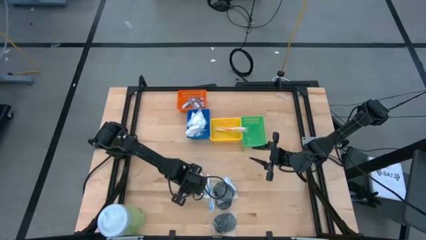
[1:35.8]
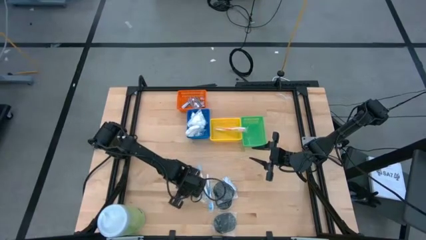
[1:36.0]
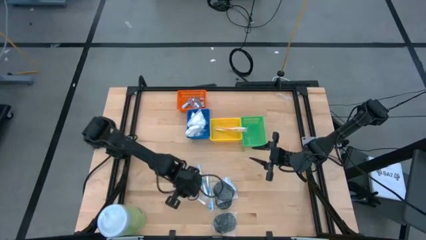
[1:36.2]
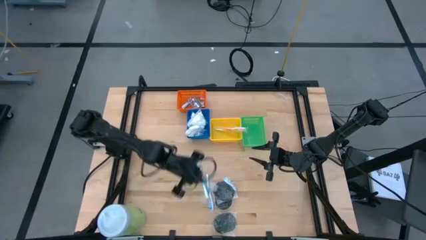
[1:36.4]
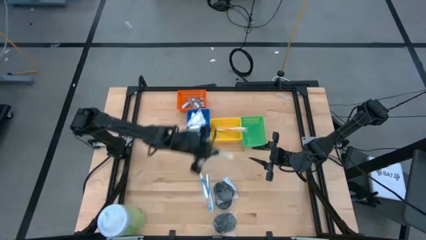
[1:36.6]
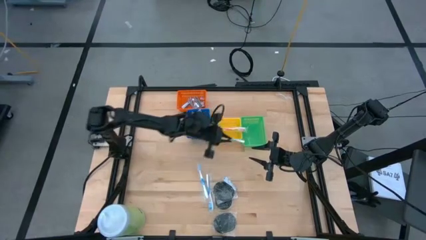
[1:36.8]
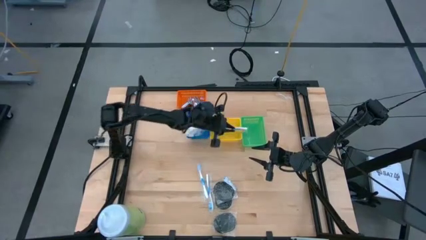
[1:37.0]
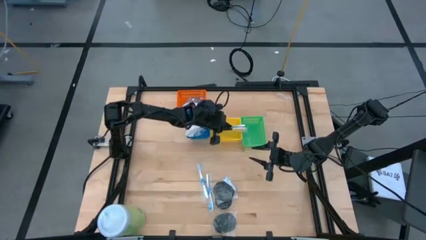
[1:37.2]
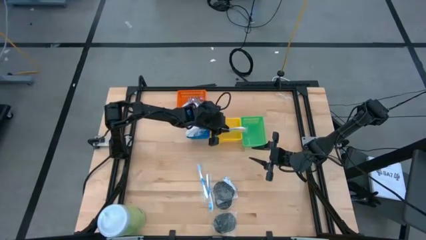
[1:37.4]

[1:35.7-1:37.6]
Task: Pick & Place Travel size toiletries
Put the green toothbrush into the yellow basket

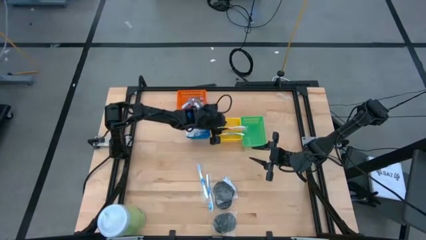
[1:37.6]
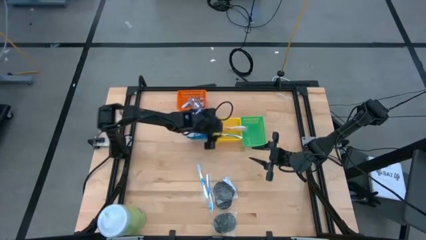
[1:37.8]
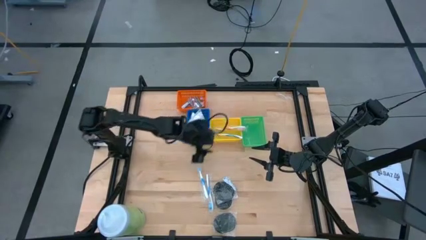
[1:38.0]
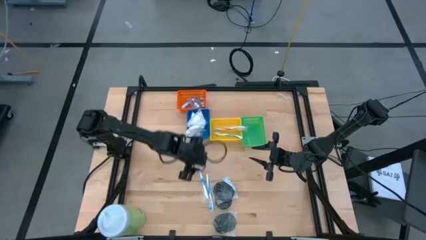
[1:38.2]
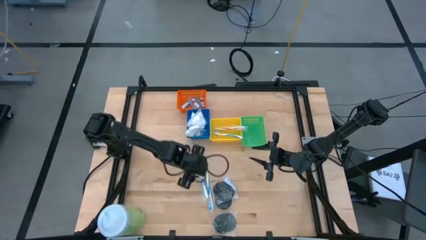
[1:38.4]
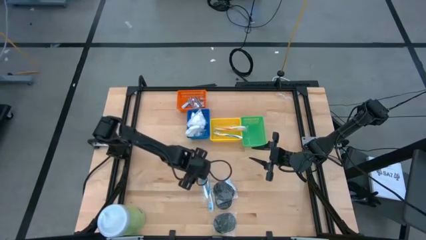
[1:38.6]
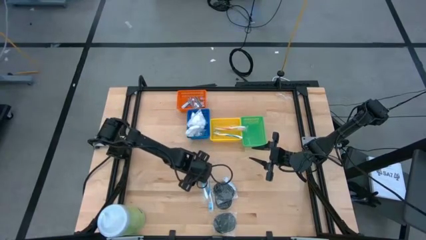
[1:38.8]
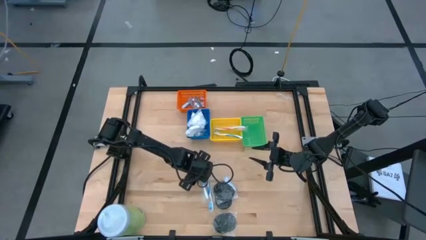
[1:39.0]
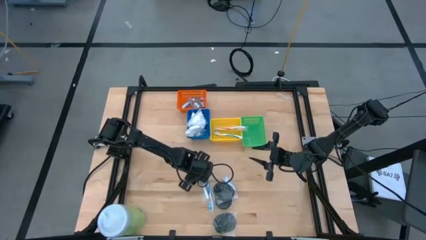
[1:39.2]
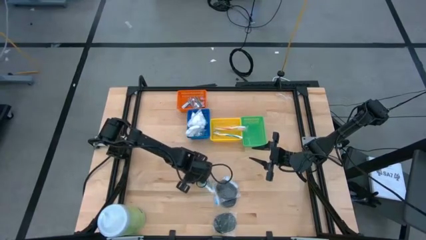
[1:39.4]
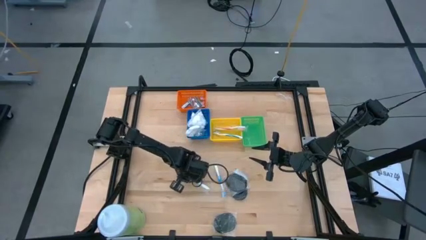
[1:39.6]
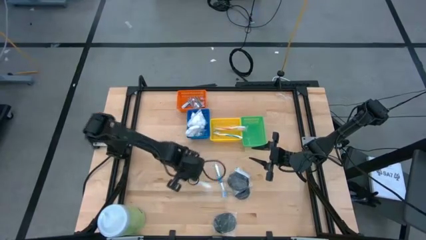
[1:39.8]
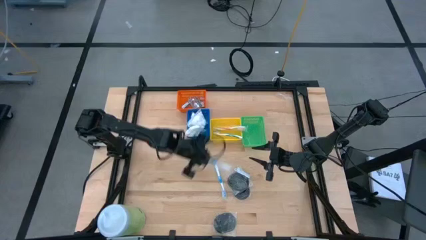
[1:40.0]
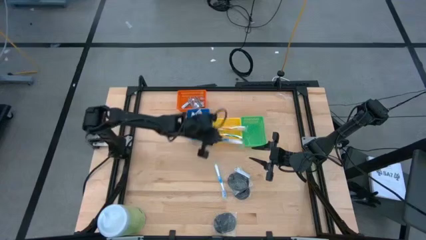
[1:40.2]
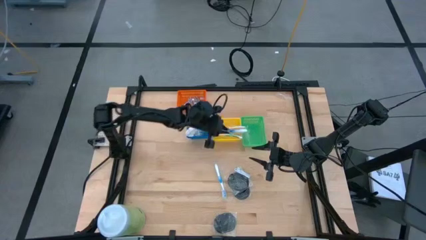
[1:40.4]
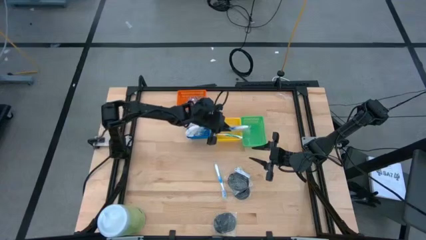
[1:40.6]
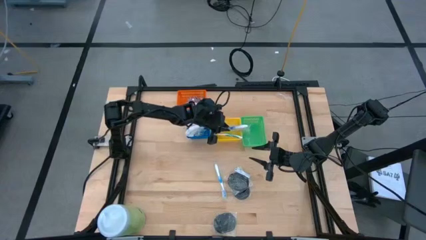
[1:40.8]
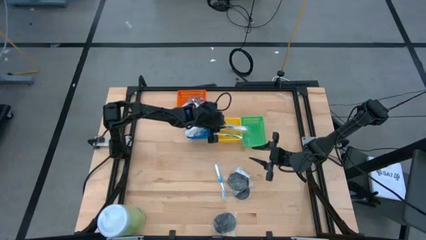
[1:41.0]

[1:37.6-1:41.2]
Put the left blue toothbrush into the yellow basket

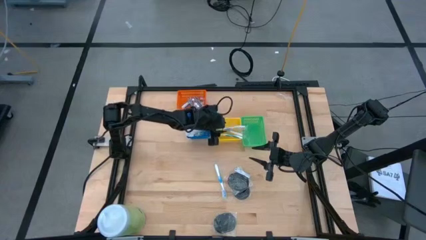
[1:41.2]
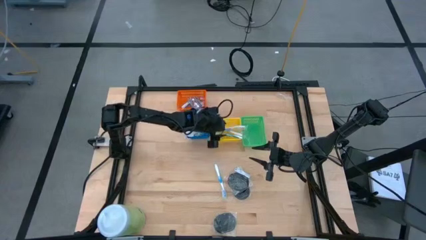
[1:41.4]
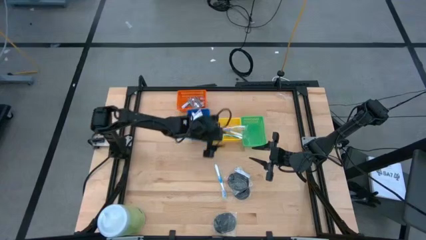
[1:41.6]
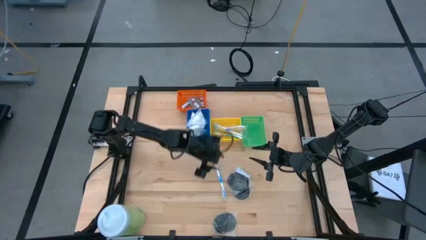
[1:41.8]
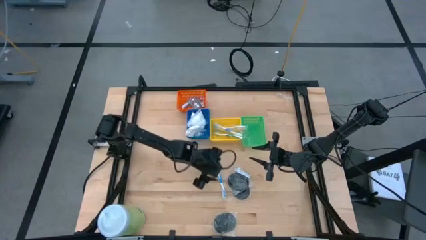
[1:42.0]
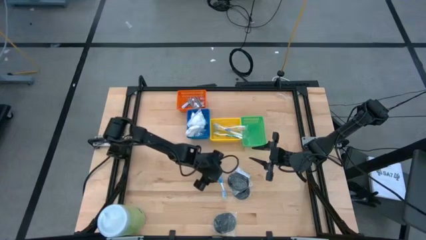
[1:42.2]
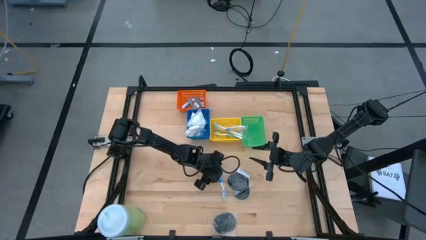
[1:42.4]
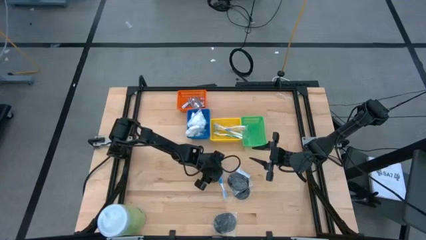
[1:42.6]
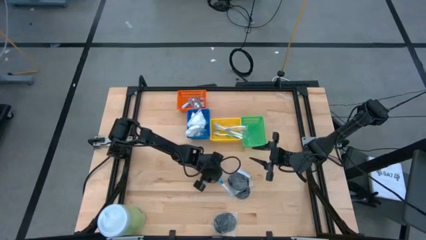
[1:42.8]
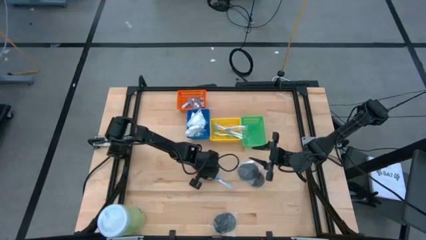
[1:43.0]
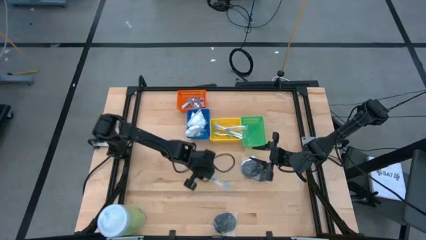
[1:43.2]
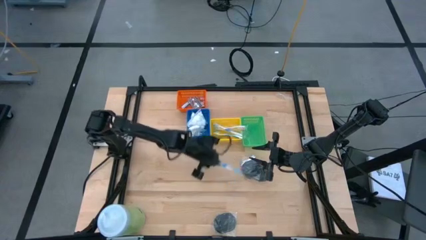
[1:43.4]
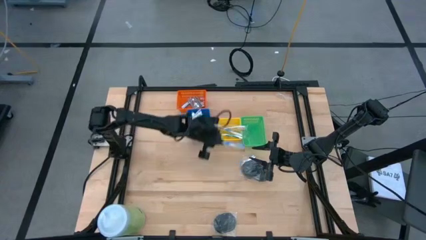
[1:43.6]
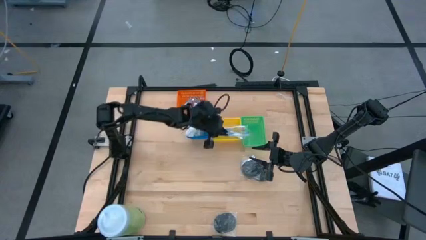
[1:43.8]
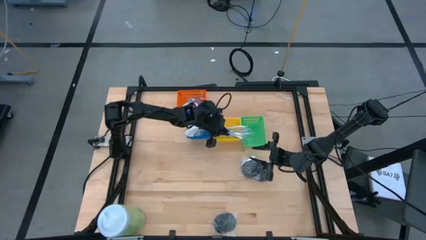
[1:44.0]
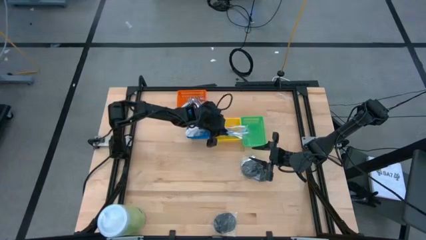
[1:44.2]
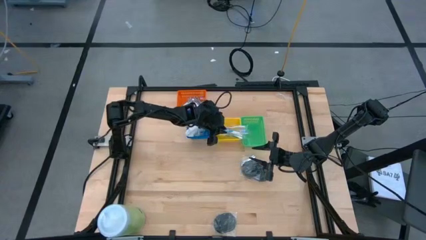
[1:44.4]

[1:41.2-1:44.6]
Put the blue toothbrush into the yellow basket

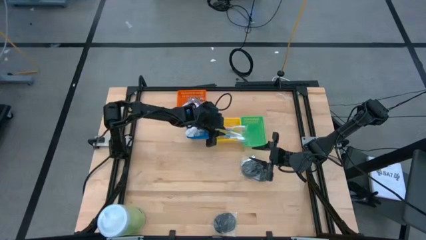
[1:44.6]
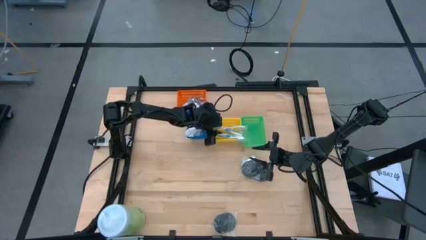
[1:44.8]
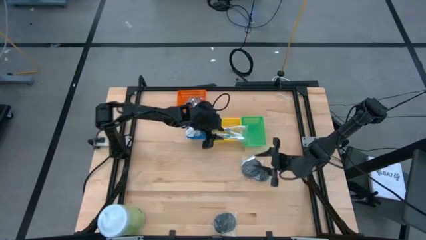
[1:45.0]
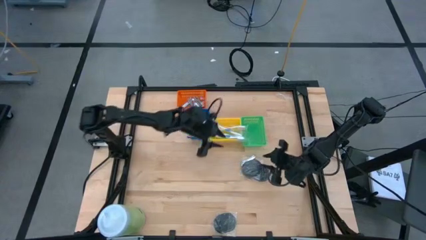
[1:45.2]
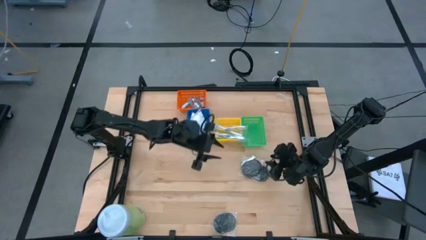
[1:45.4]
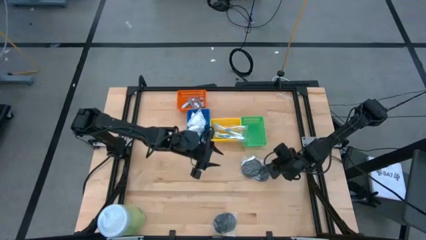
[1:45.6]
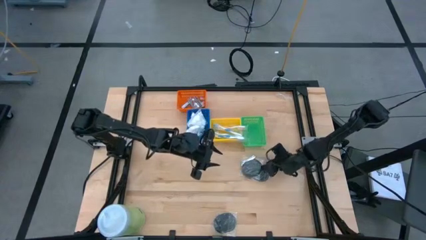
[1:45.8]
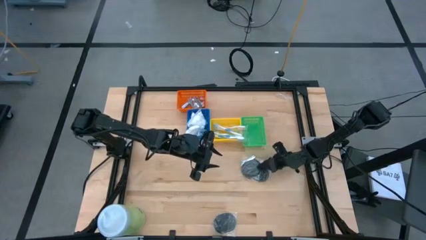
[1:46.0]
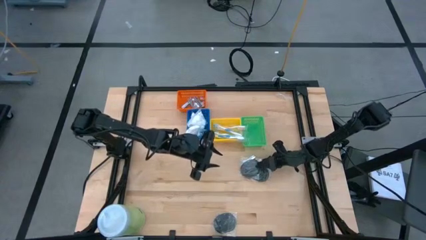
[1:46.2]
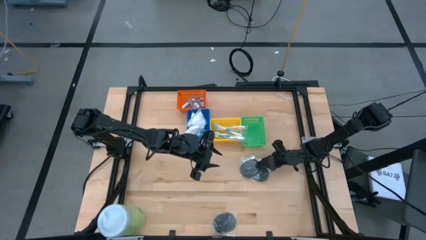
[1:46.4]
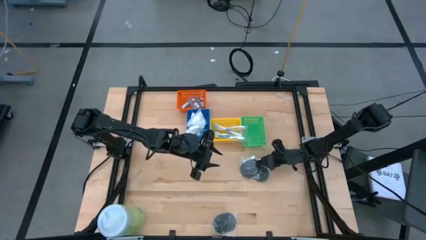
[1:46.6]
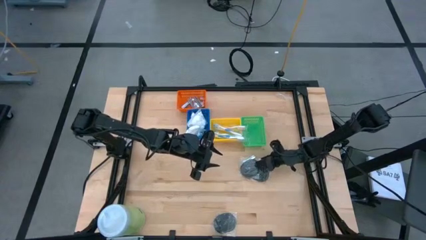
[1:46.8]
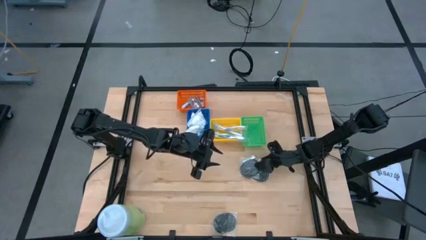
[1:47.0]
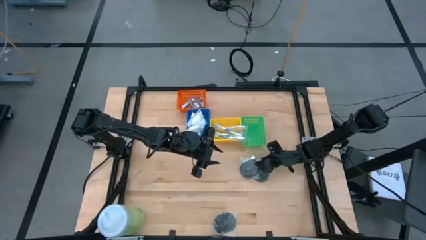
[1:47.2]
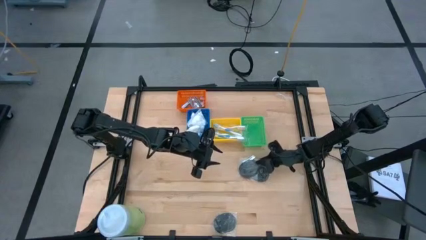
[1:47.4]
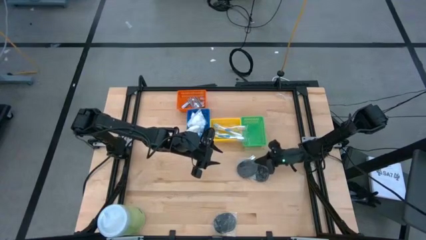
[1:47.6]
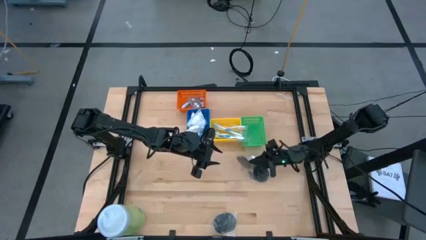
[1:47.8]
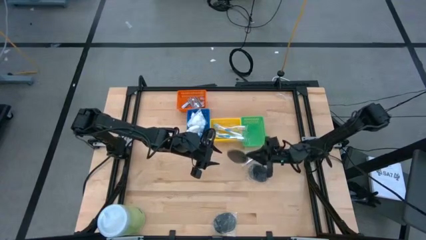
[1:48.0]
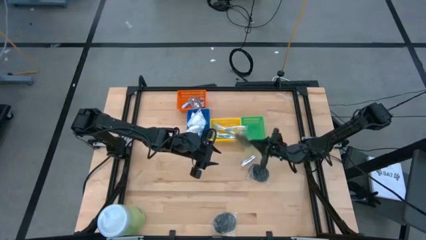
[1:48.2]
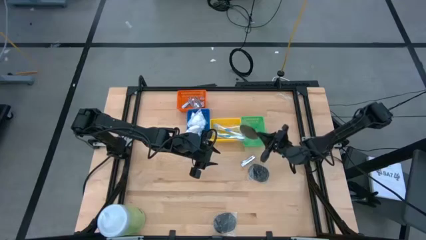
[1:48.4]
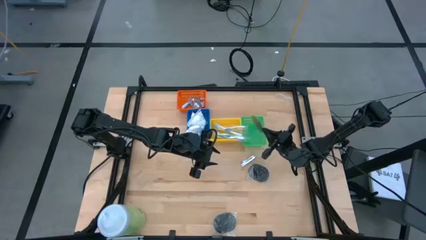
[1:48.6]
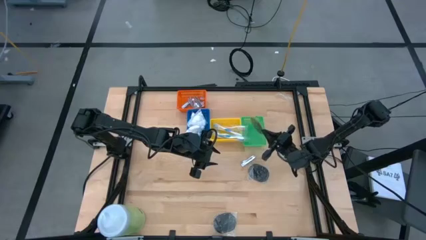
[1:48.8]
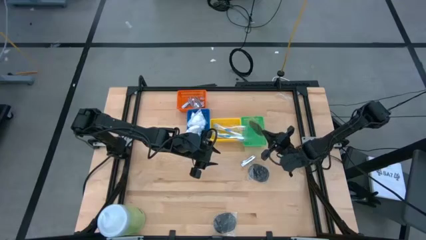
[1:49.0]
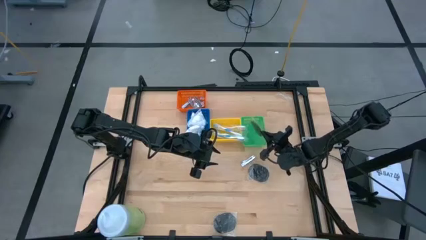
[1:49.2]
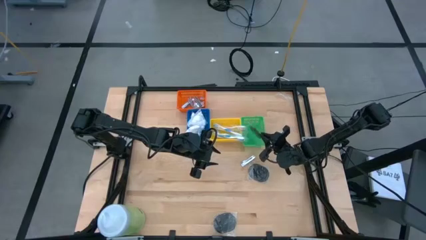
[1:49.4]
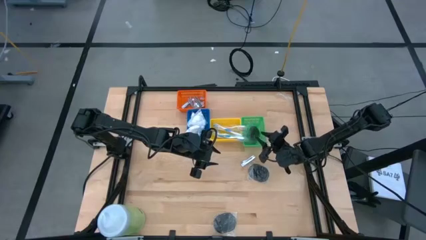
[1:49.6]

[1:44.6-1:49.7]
Put the top left hairbrush into the green basket

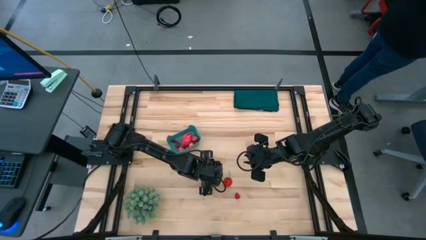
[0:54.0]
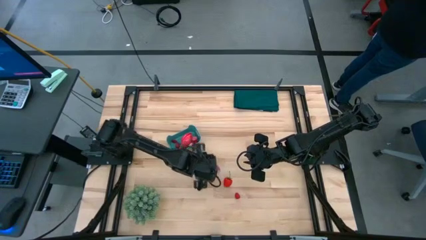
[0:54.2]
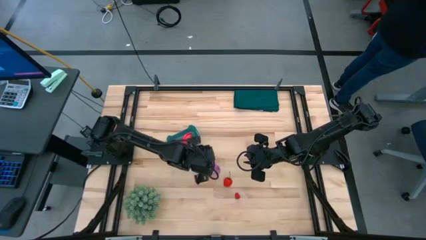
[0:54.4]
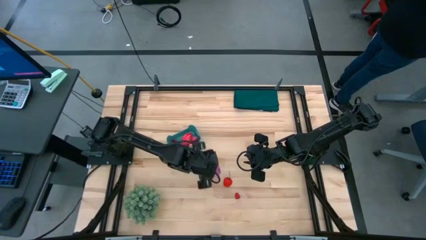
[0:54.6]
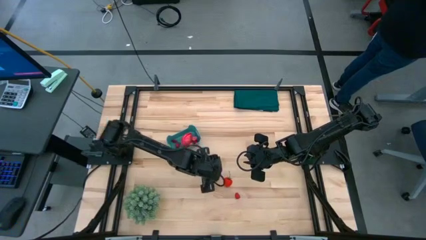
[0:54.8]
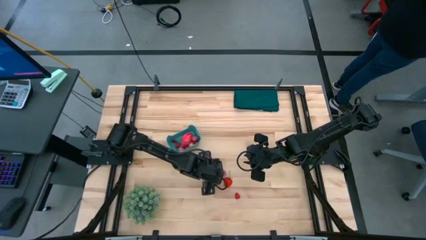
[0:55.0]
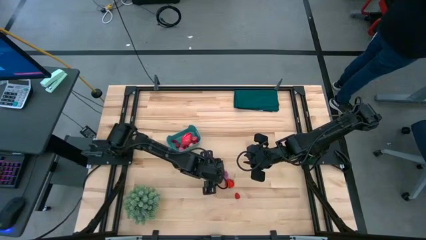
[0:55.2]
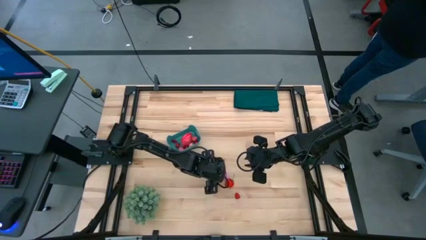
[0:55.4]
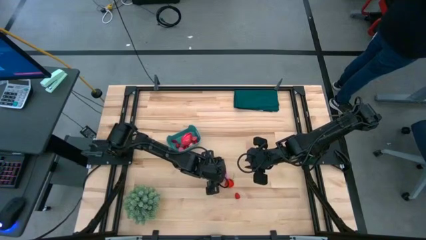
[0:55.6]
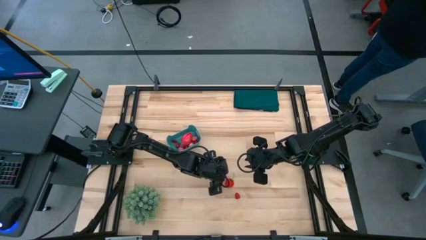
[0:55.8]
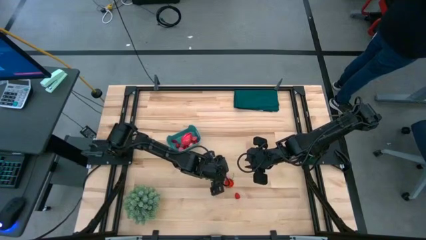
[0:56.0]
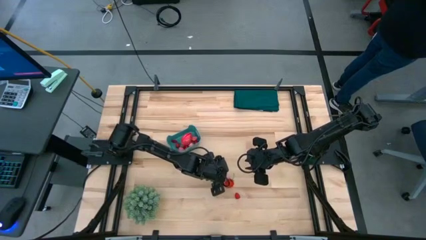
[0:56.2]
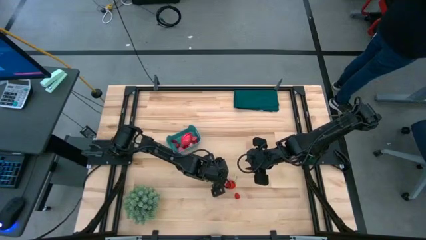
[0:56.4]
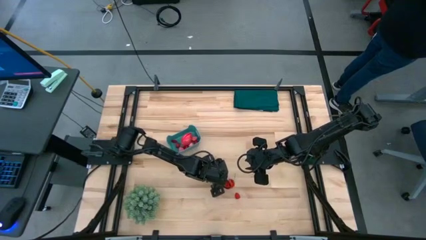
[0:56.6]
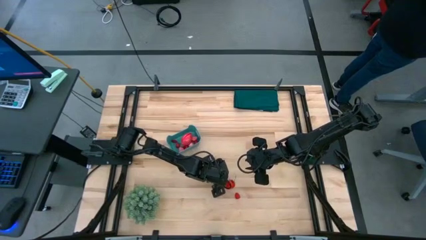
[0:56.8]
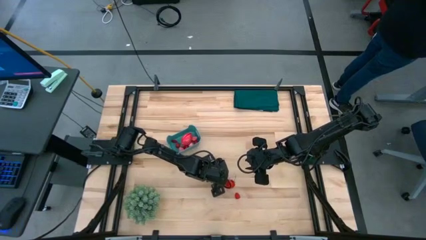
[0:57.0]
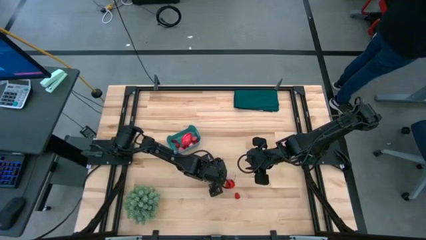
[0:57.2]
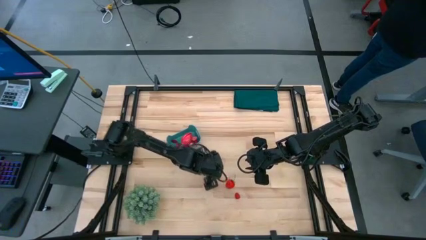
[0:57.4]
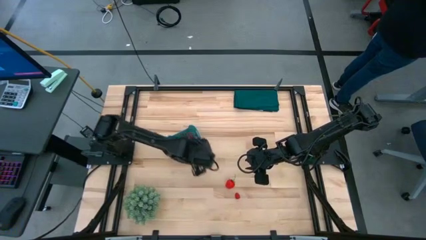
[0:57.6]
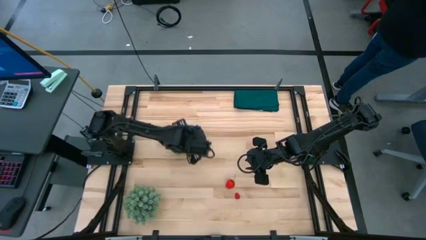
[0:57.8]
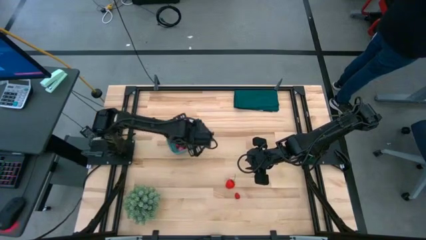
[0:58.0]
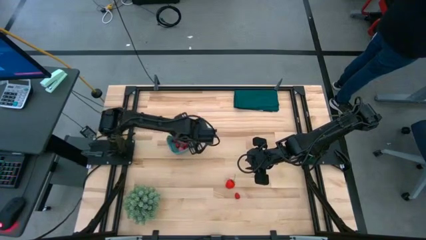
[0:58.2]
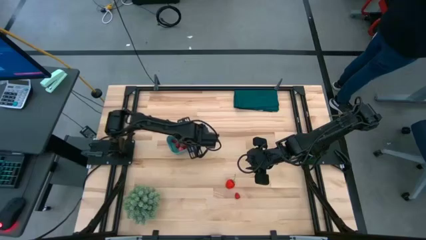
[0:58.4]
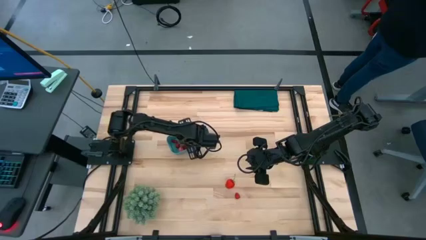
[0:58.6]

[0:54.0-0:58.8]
Task: Pick and placing Produce into tupperware
Put the violet onion into the blue bin
